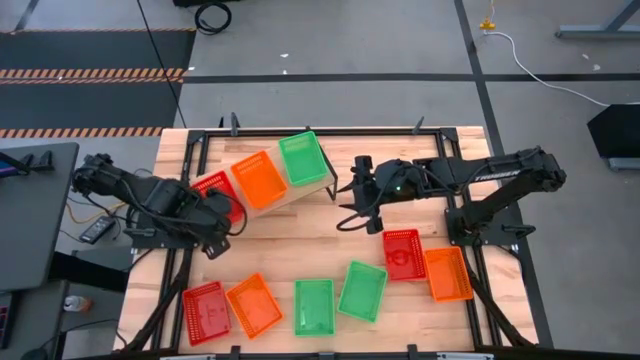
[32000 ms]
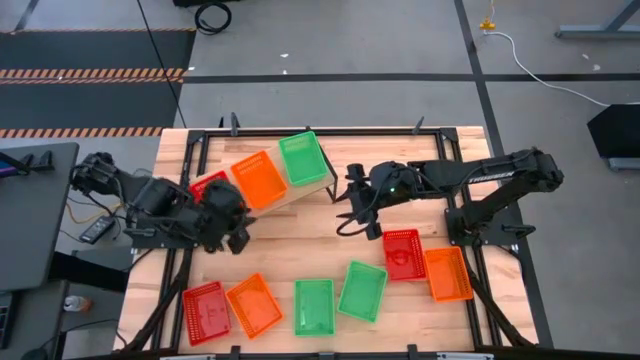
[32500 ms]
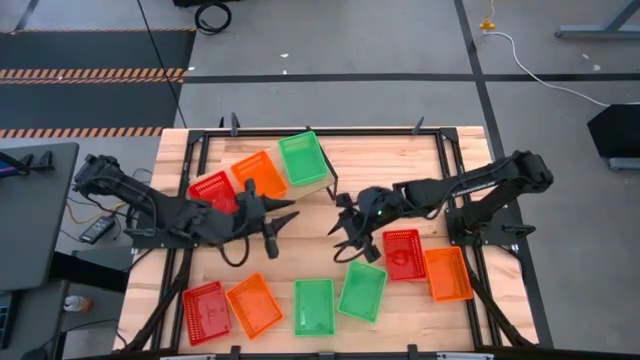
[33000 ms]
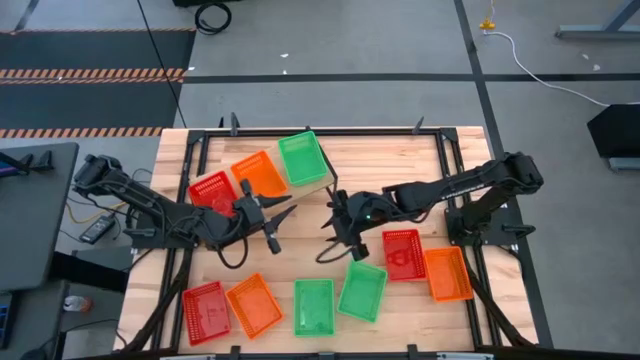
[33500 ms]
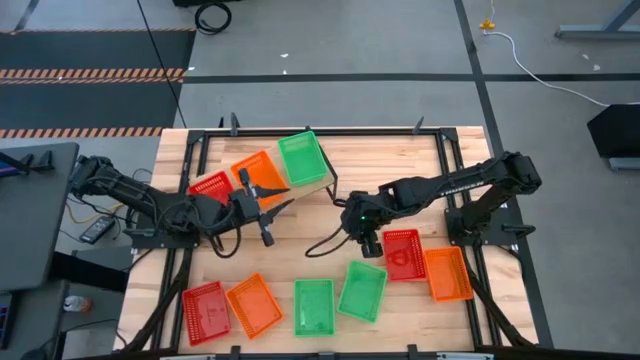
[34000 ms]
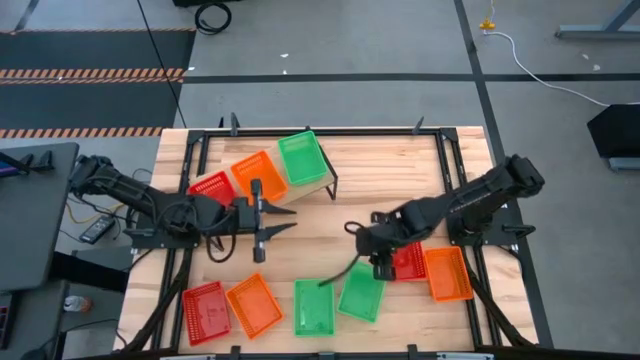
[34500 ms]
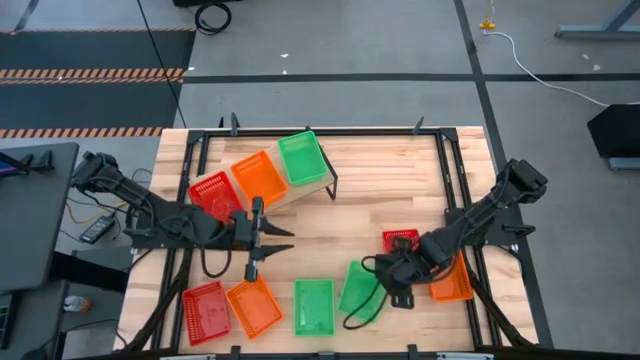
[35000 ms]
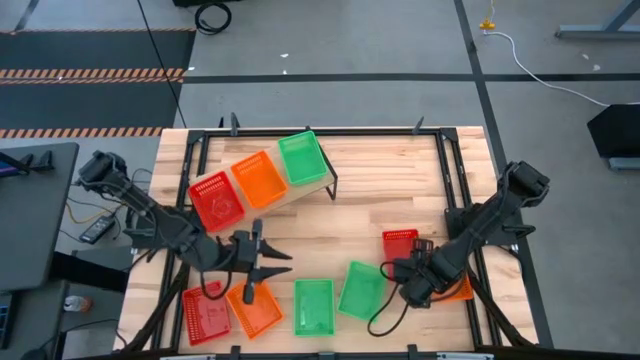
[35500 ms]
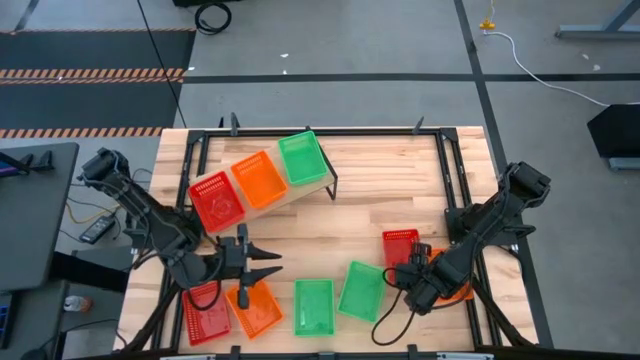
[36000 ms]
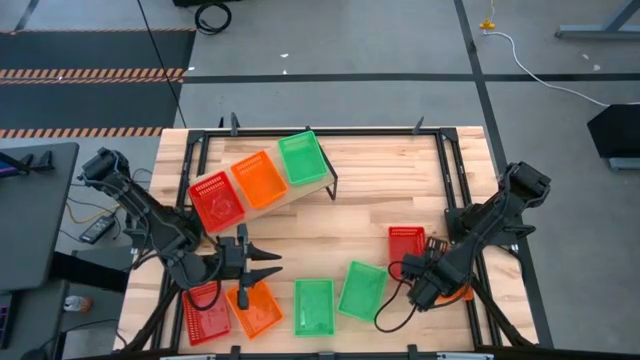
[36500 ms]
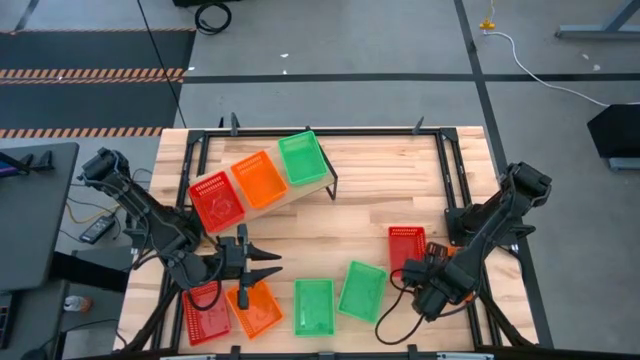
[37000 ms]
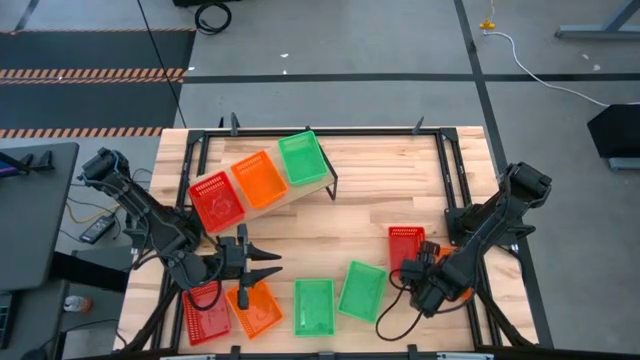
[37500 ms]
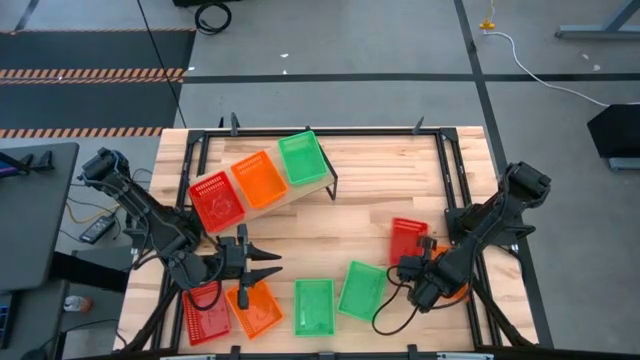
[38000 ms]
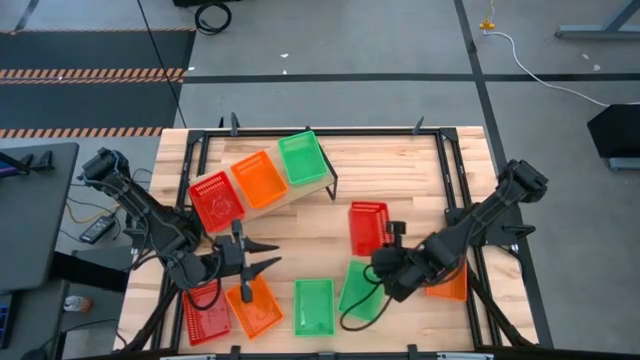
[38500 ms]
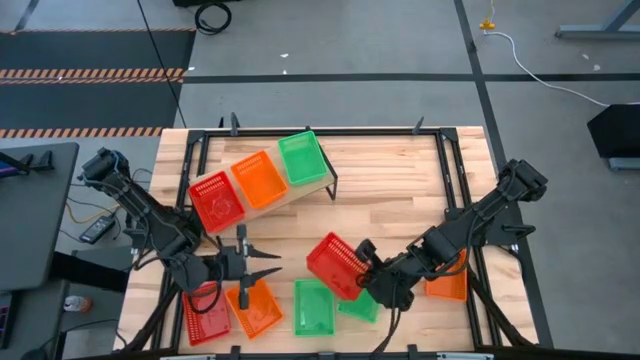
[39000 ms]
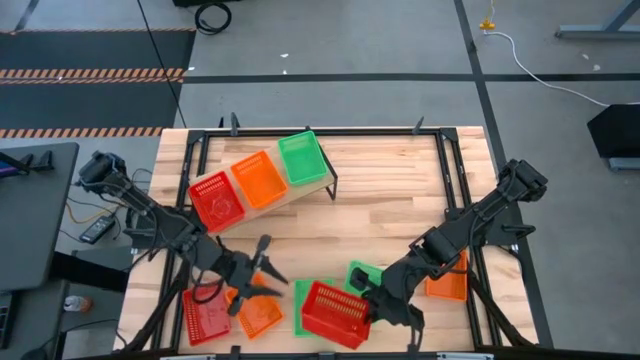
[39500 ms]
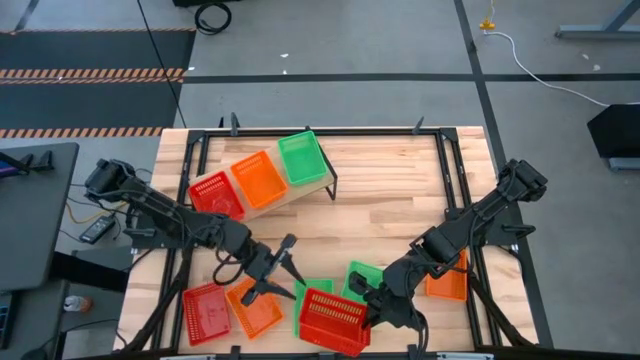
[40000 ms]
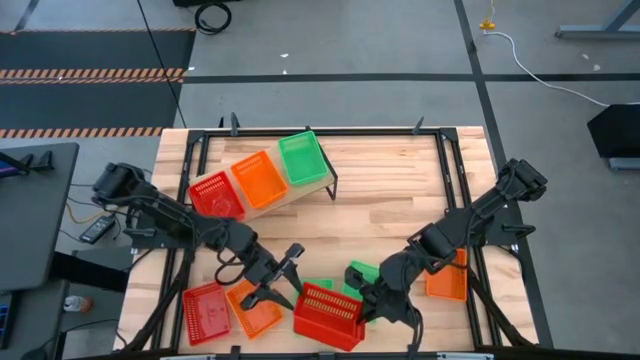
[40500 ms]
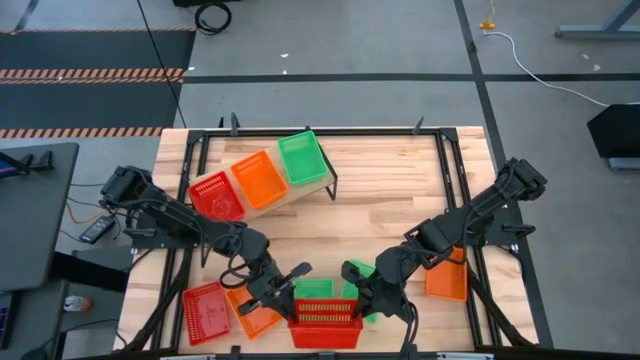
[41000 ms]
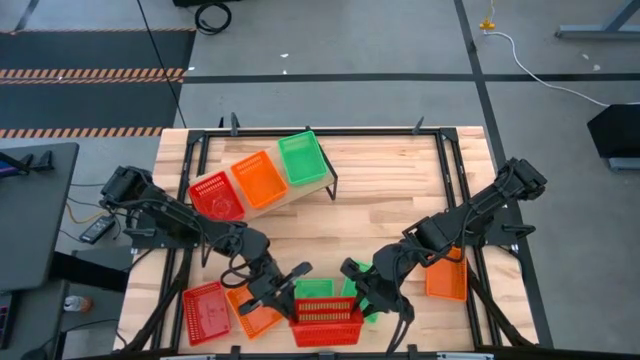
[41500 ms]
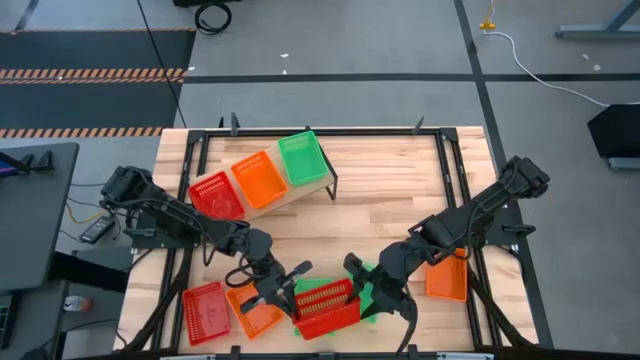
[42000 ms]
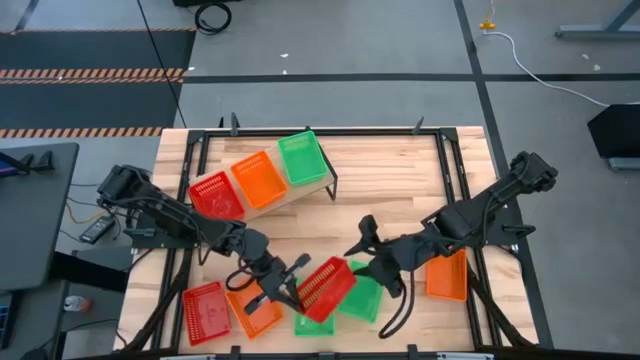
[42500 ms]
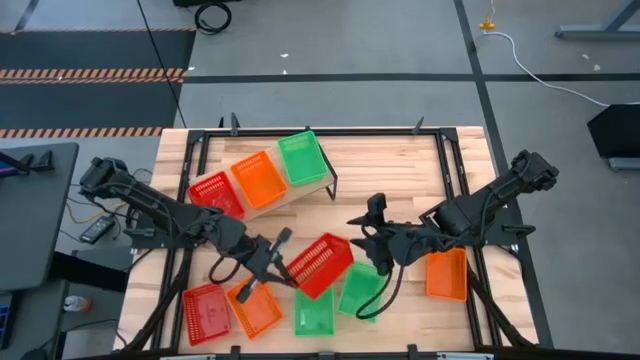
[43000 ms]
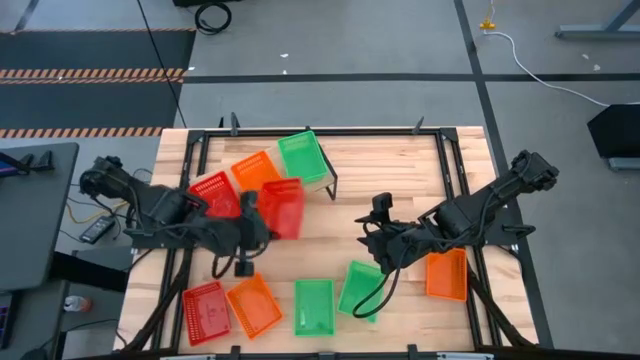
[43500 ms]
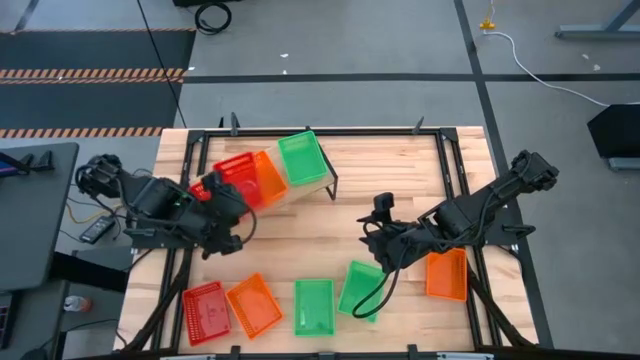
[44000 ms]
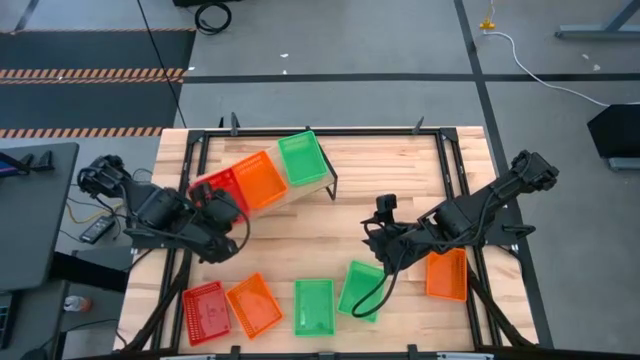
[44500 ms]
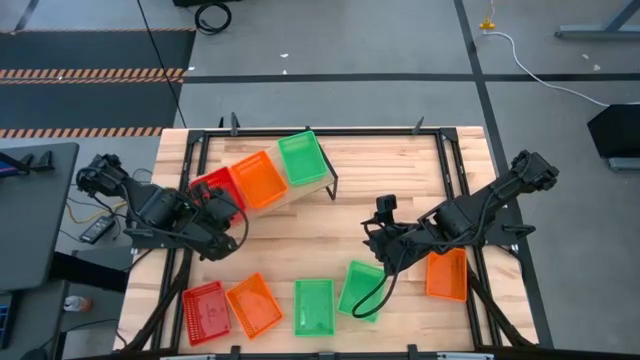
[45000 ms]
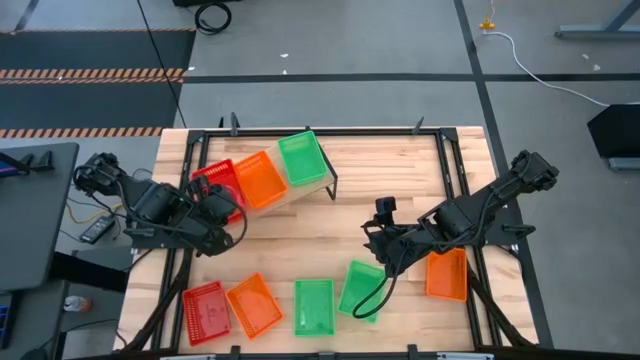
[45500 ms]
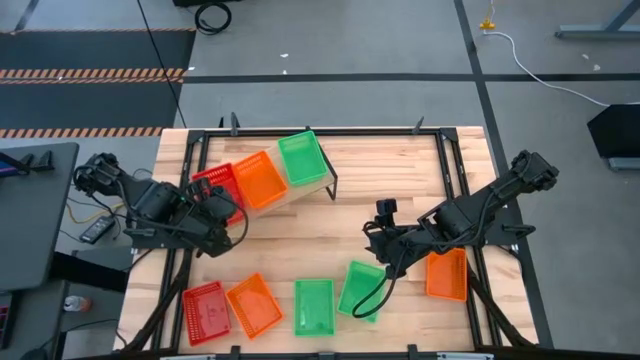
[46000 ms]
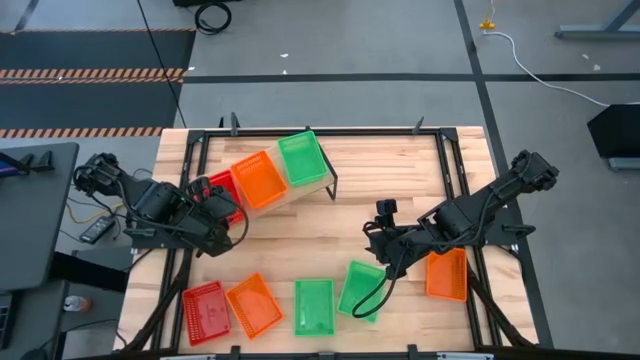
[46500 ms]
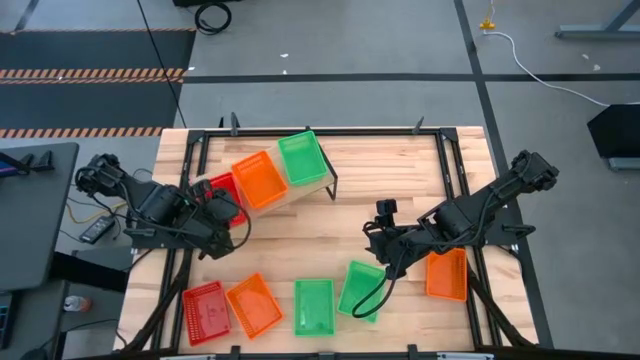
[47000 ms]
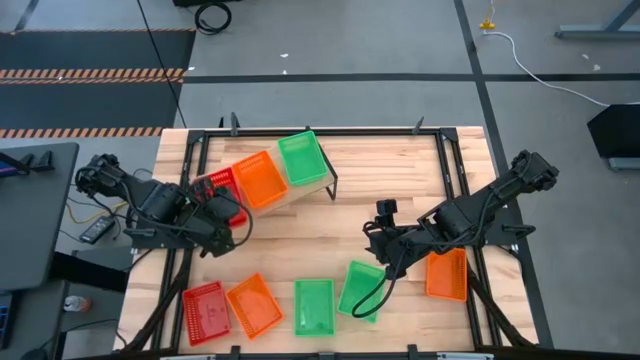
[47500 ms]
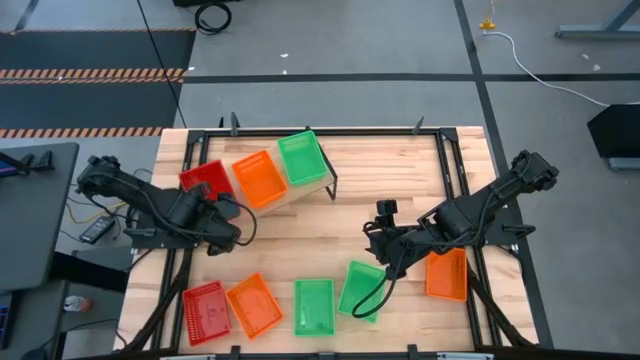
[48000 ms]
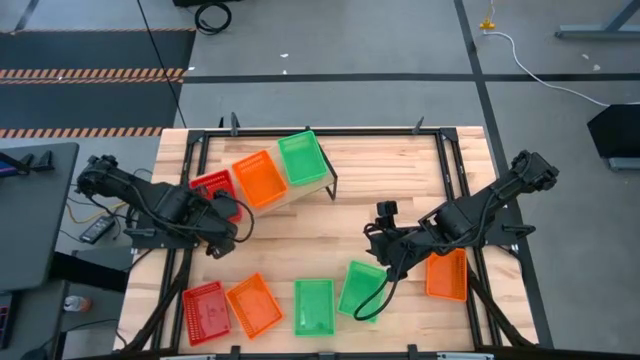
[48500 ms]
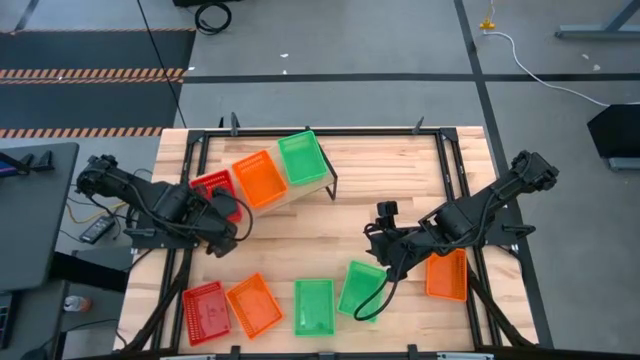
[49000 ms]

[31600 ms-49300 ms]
Task: Stack baskets on shelf by color
Stack the top red bin on the red bin on the shelf

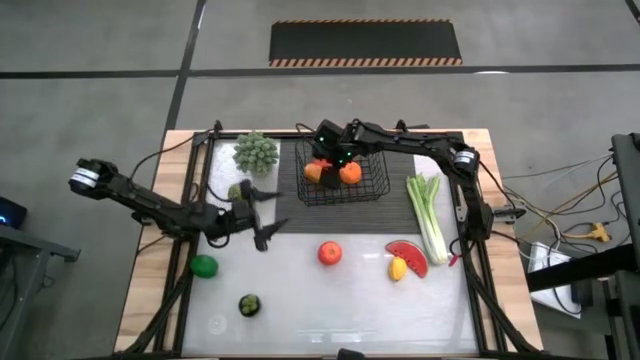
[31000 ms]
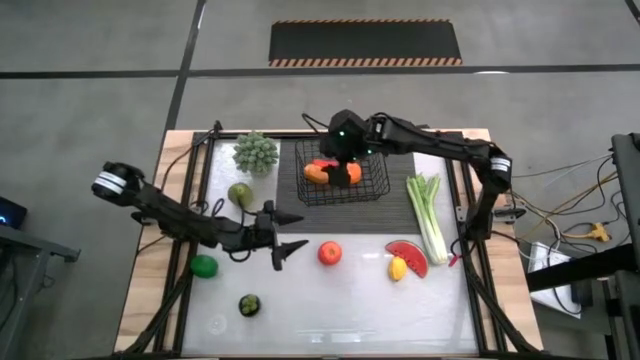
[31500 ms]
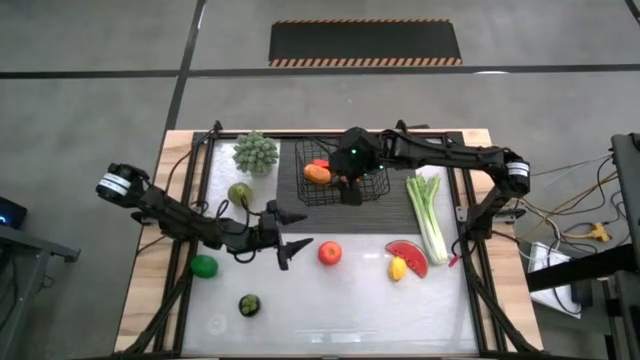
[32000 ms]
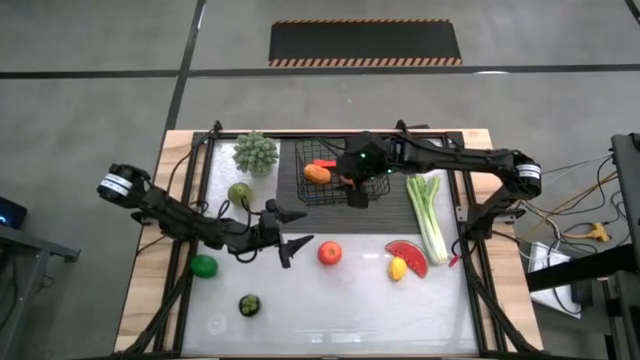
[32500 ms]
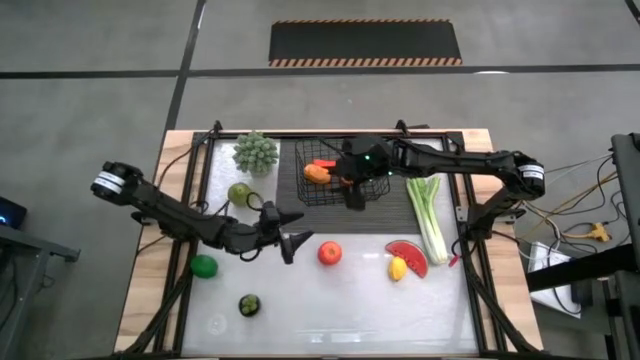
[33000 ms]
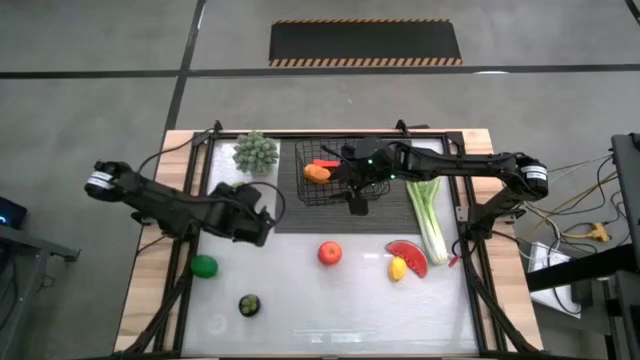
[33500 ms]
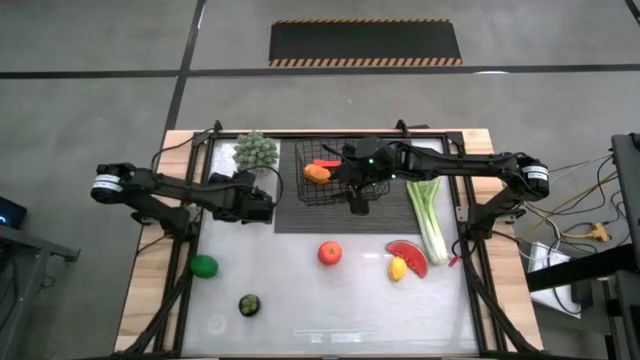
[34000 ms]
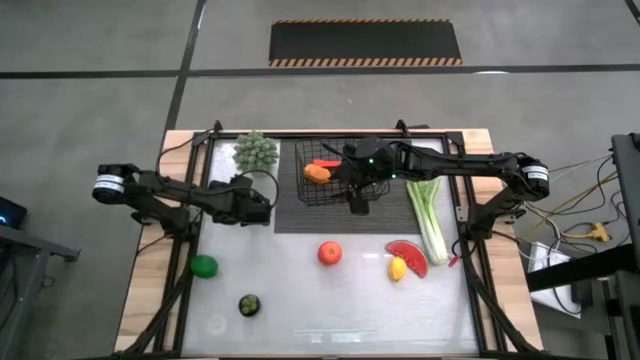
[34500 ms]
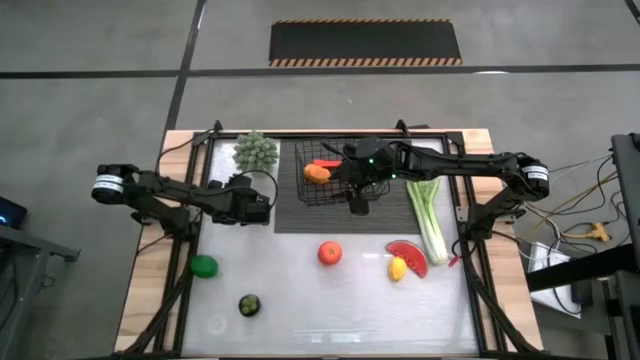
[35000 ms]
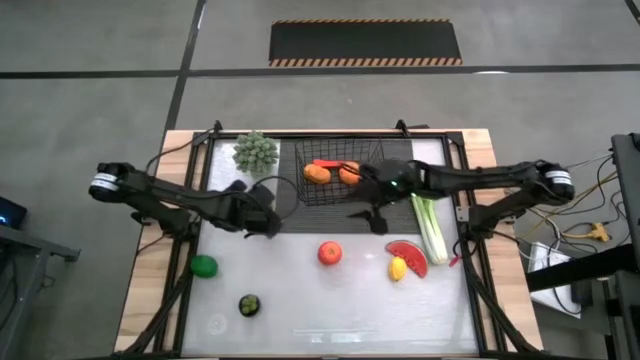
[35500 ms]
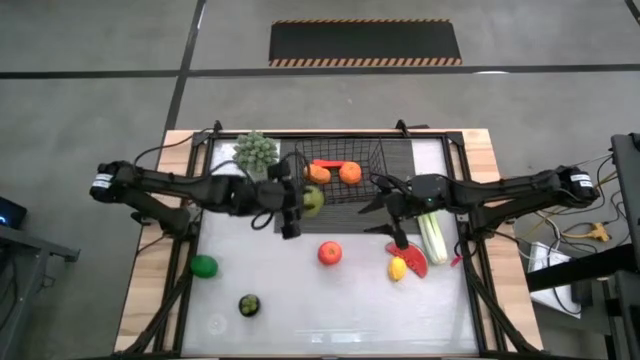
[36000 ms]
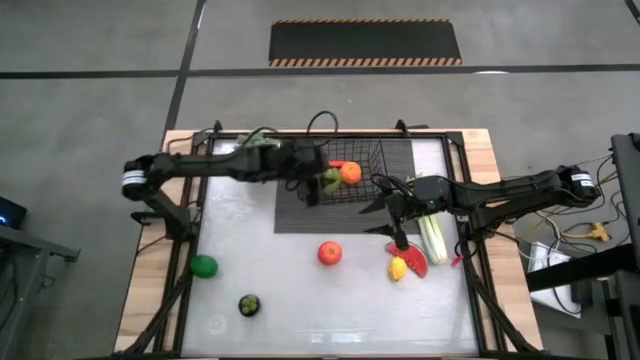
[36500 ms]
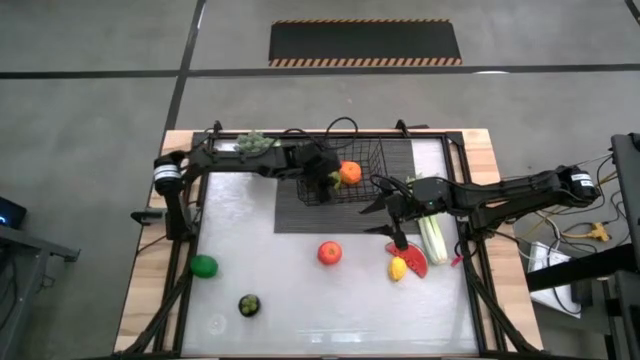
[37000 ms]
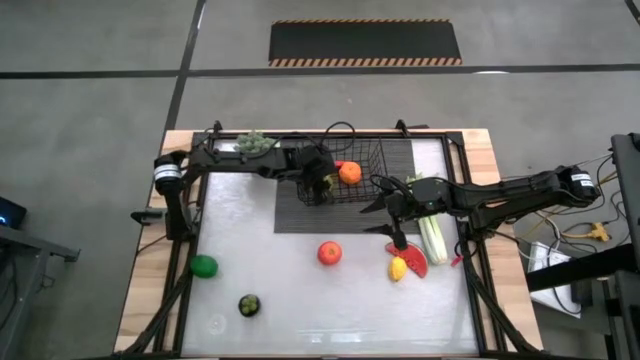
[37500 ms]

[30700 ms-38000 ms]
Task: Build produce basket
Put the green pear into the black wire basket
